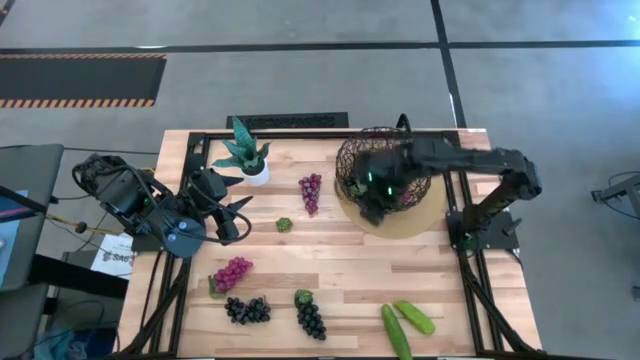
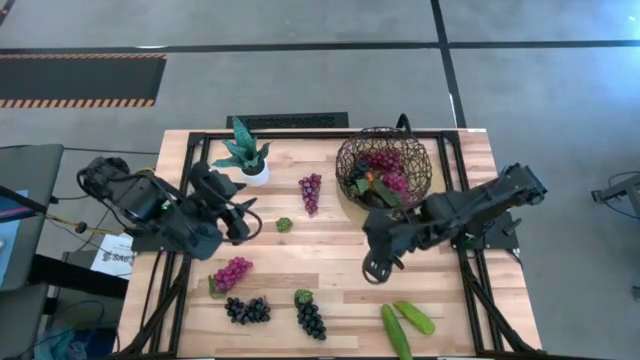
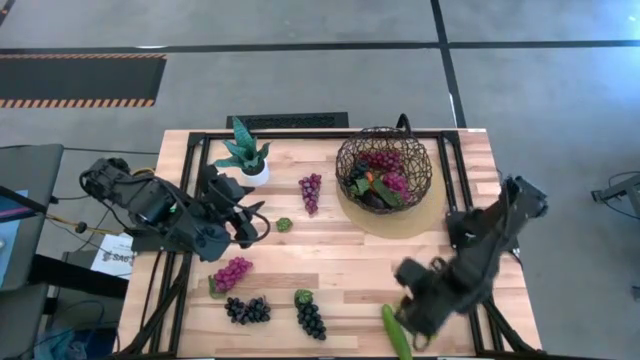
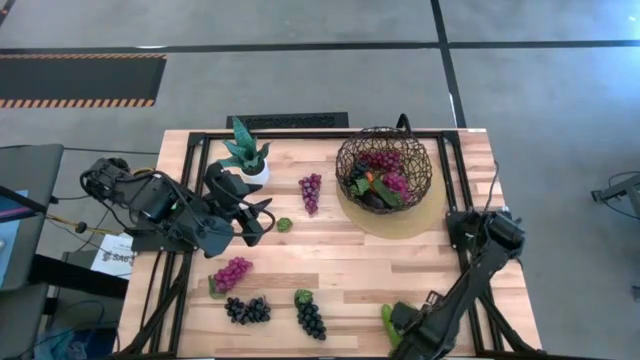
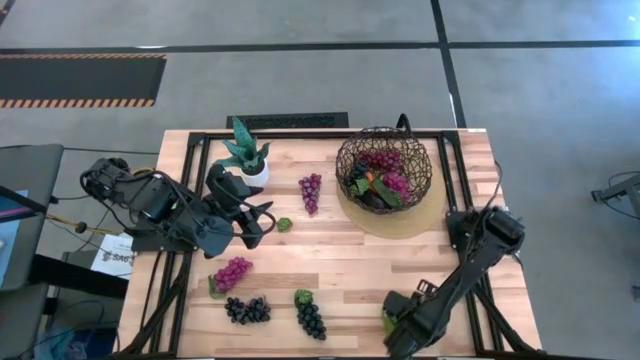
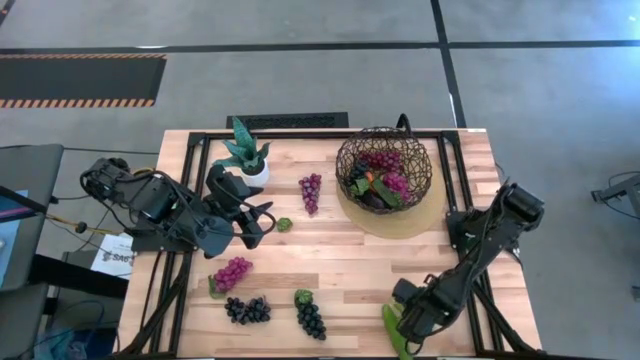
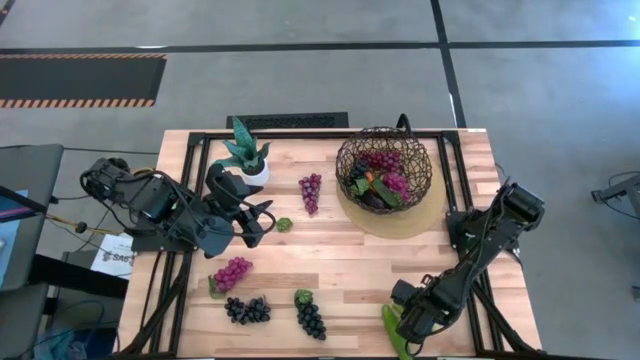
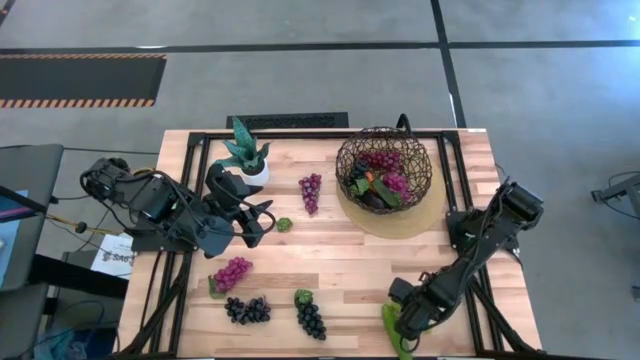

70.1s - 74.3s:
Task: Build produce basket
Put the green cucumber into the black wire basket

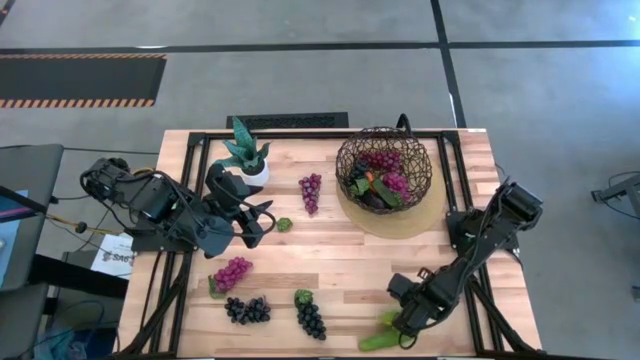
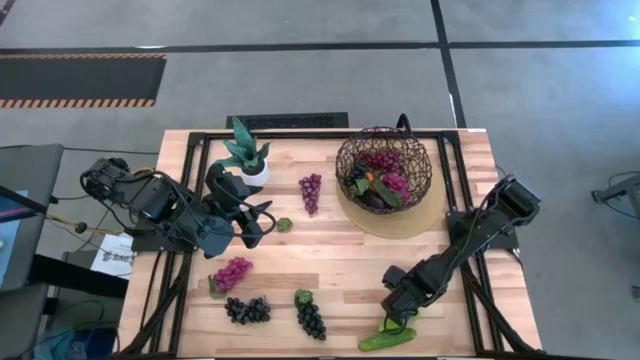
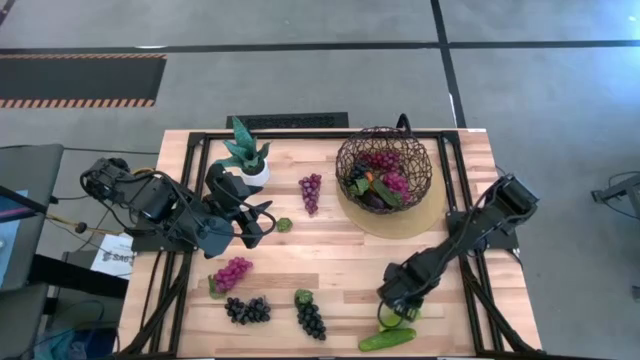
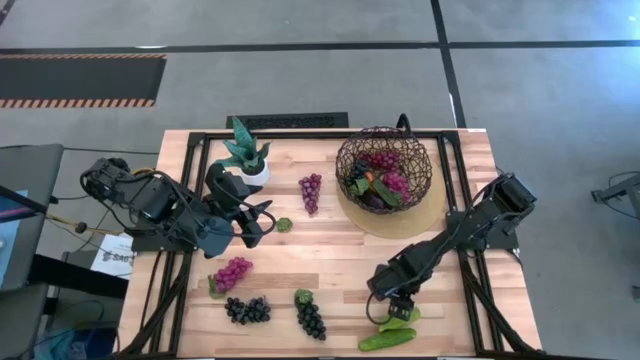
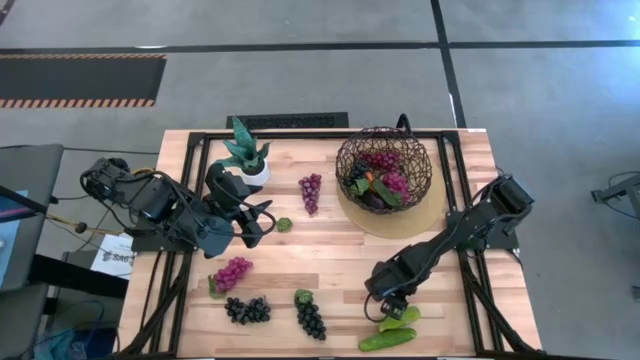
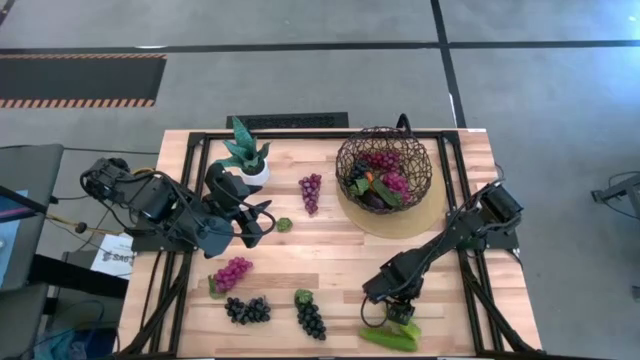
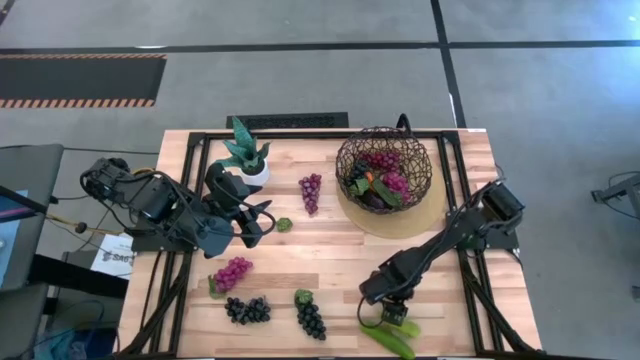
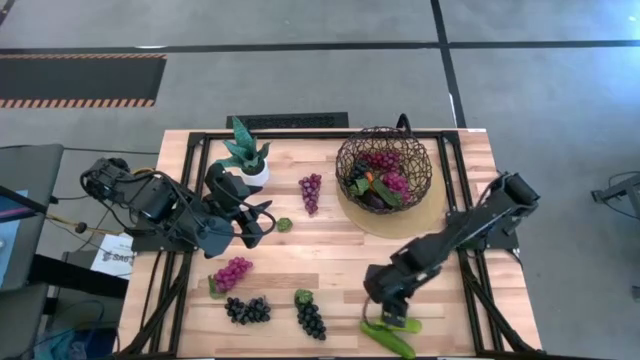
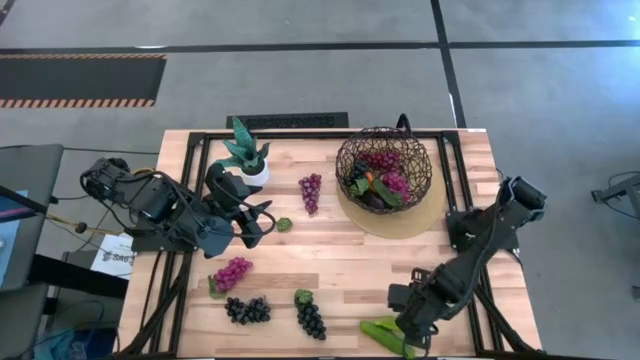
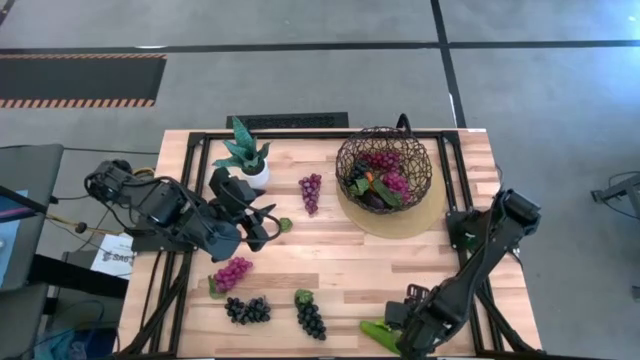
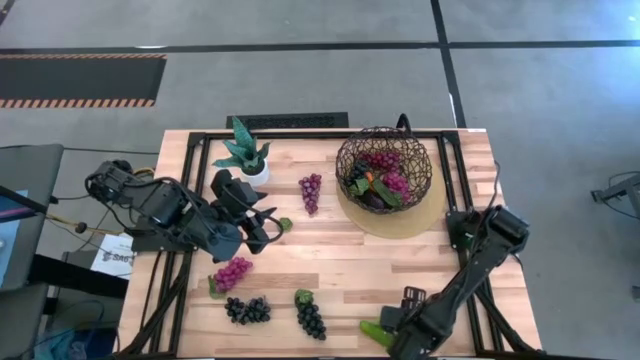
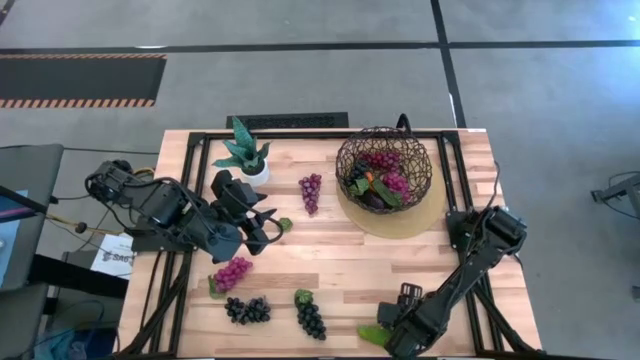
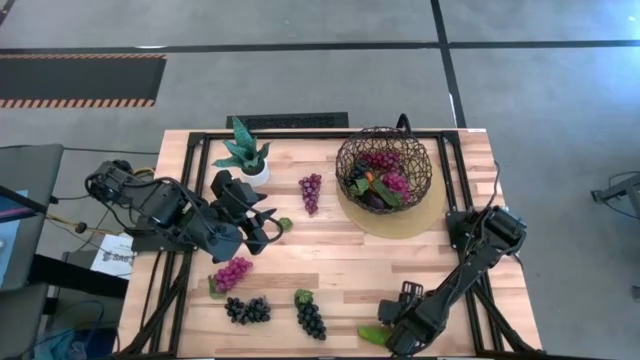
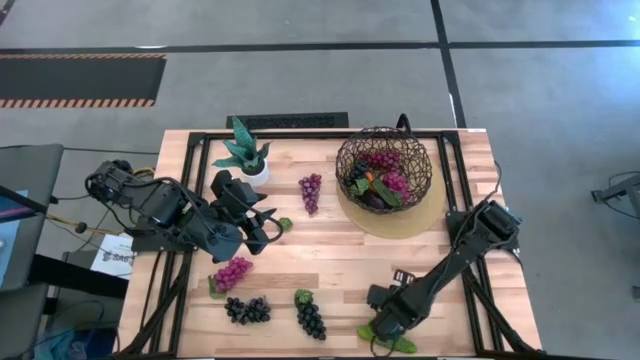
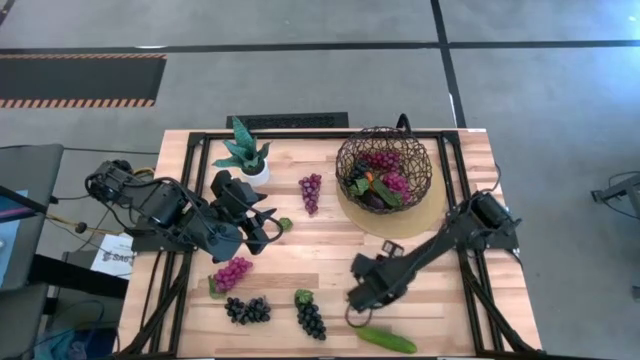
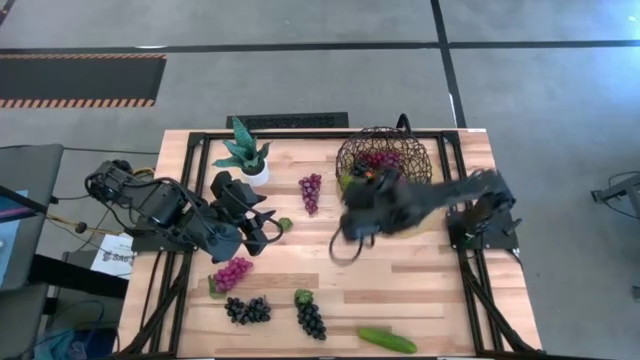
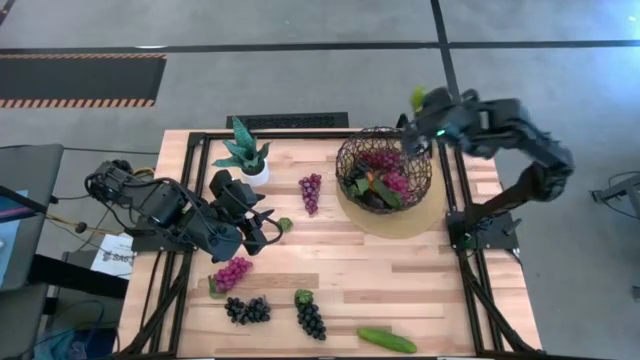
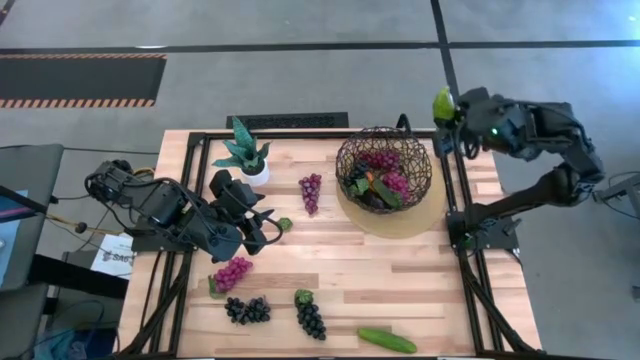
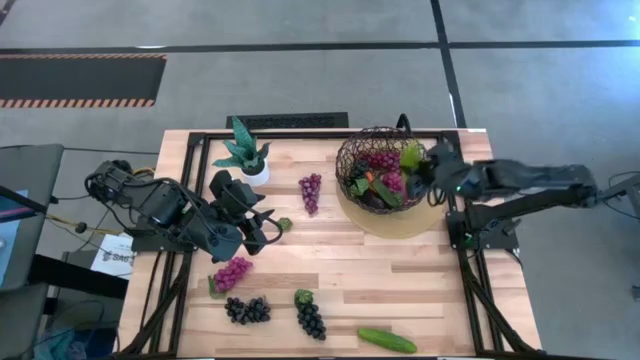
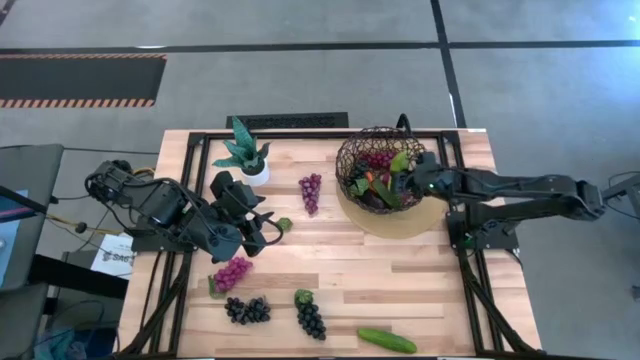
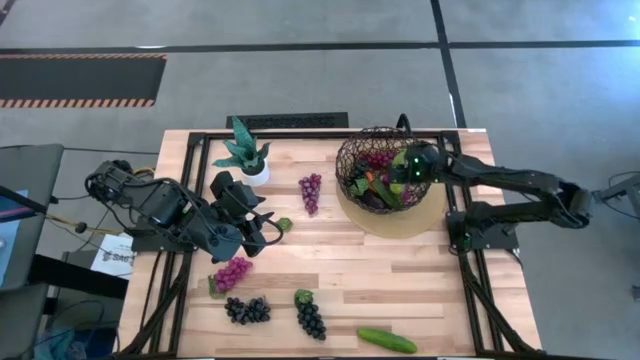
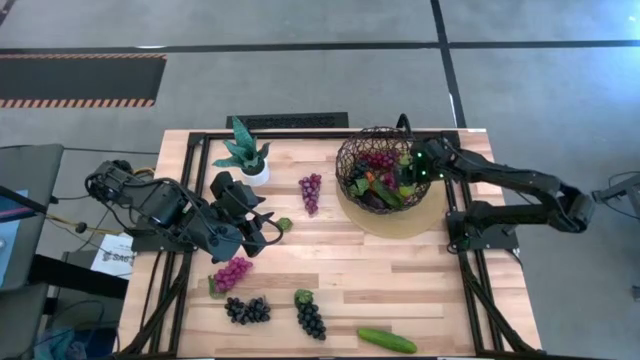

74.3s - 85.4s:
Put the green cucumber into the black wire basket

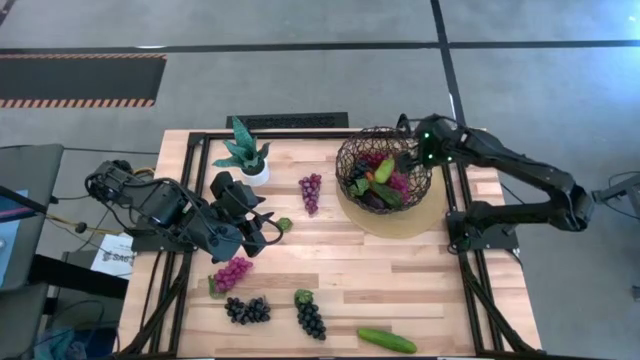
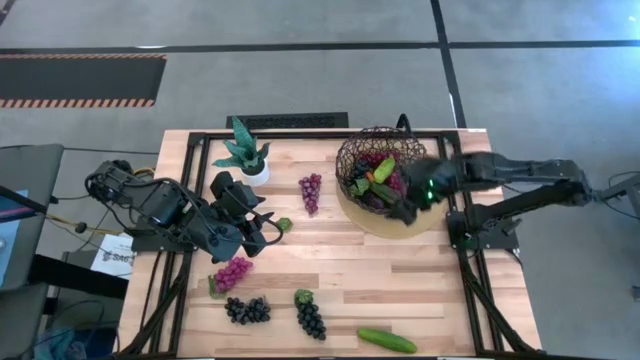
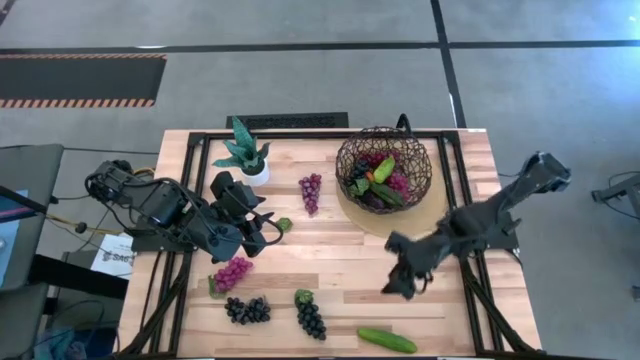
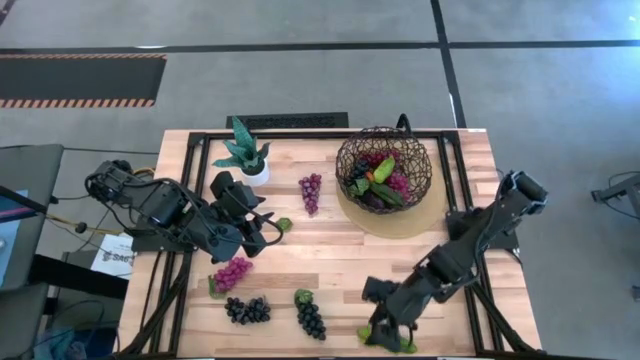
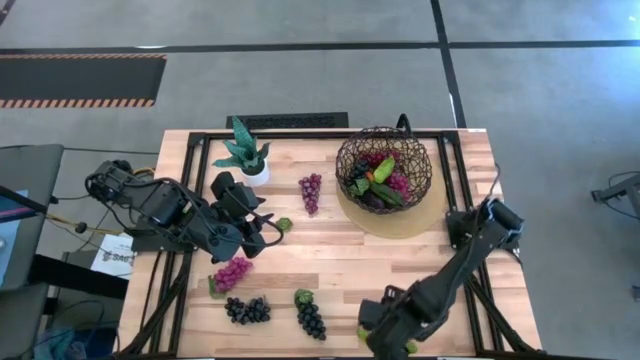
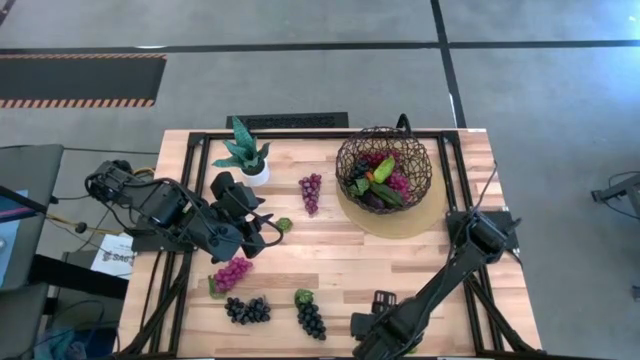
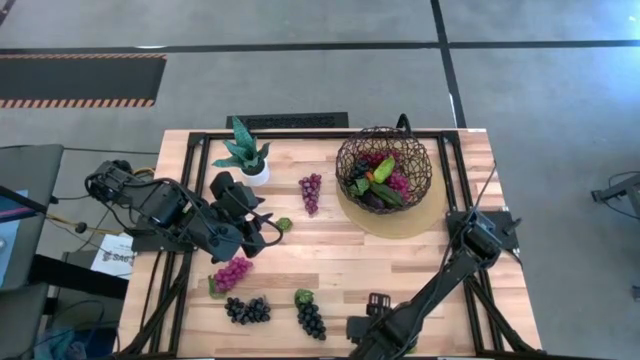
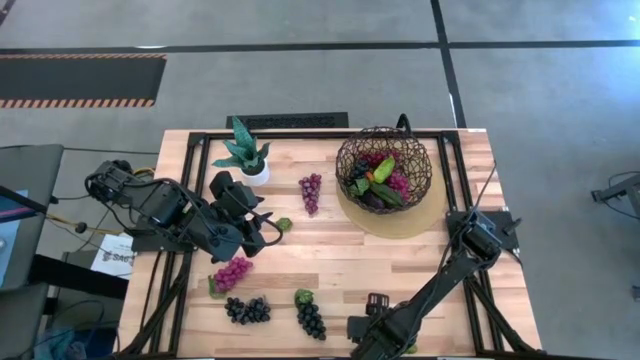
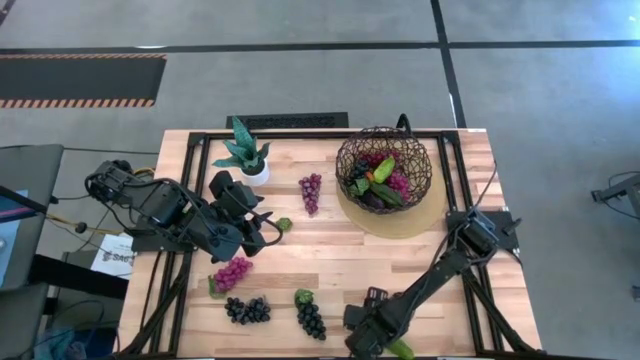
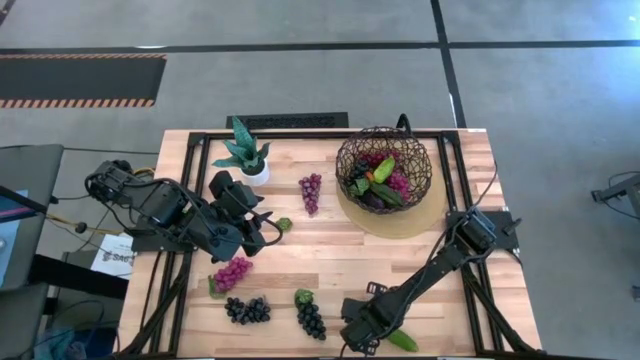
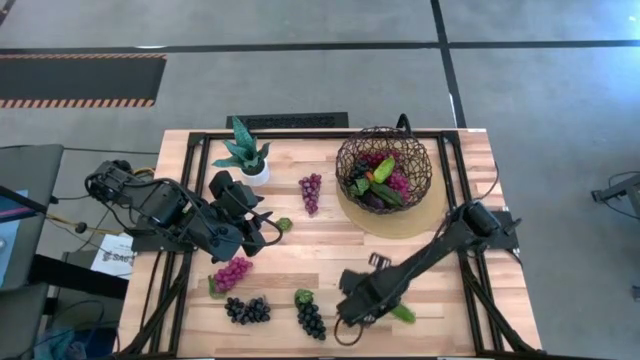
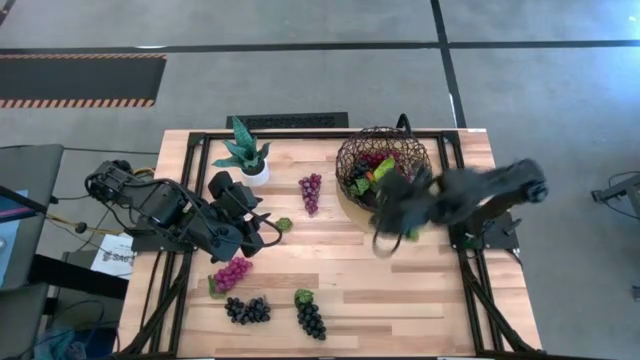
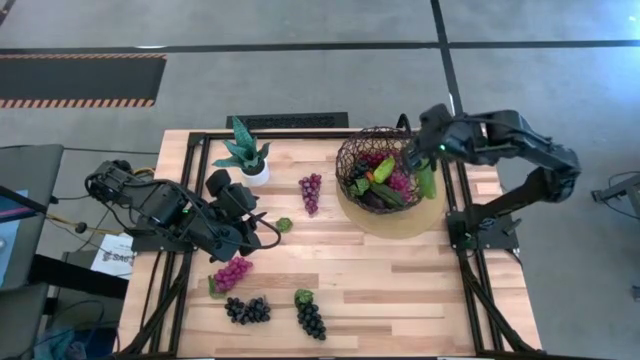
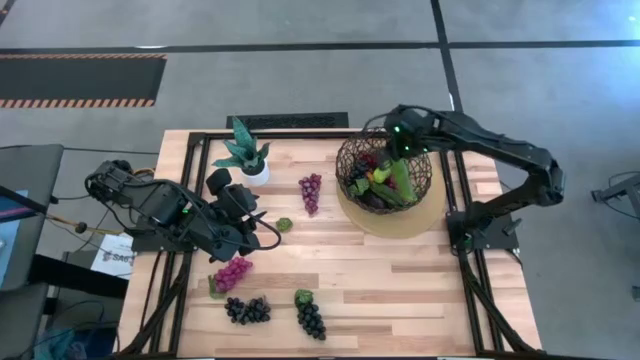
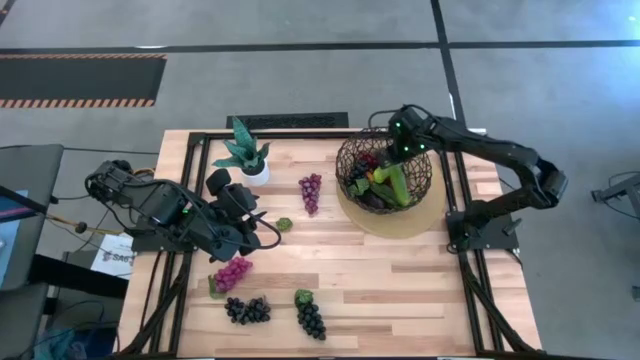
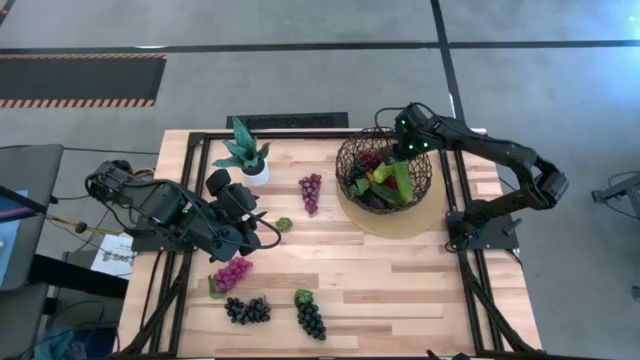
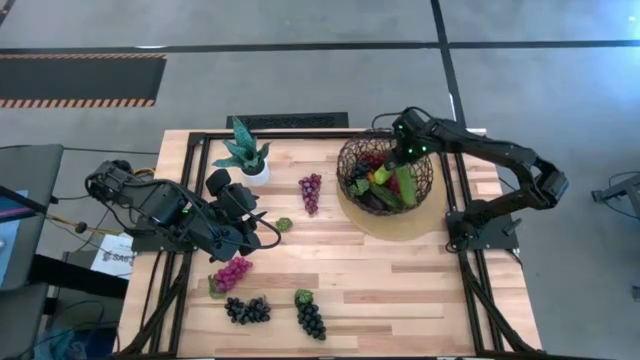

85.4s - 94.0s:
Put the green cucumber into the black wire basket
